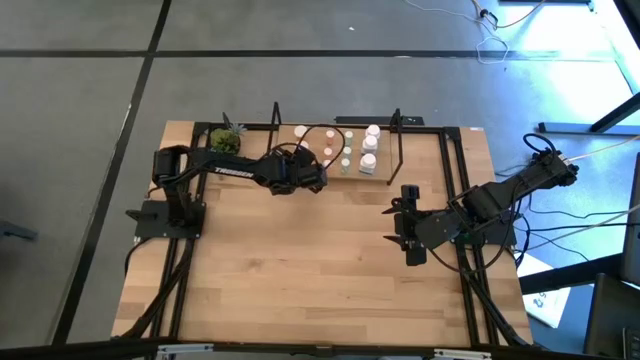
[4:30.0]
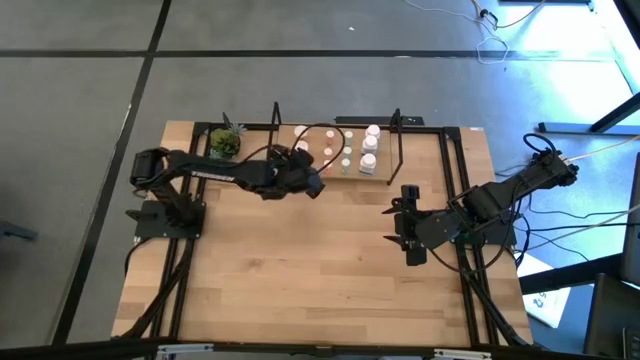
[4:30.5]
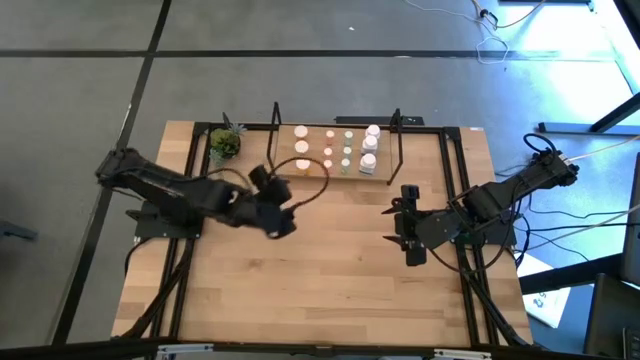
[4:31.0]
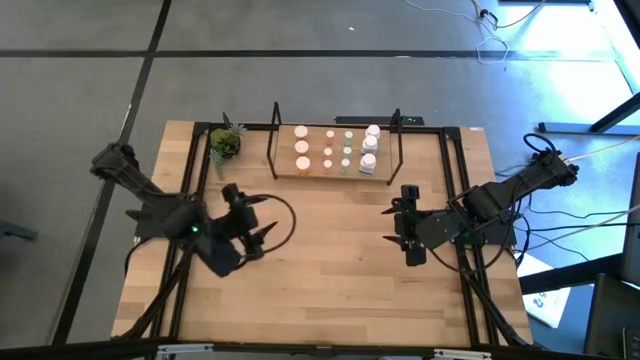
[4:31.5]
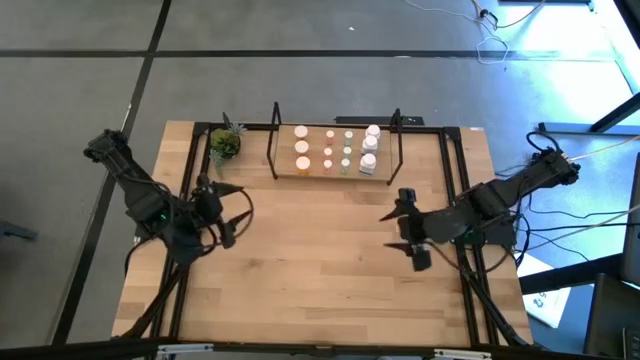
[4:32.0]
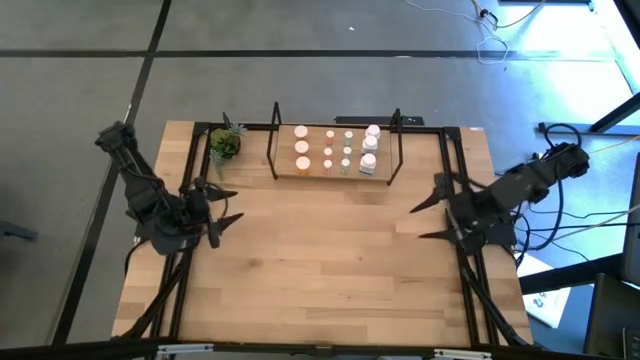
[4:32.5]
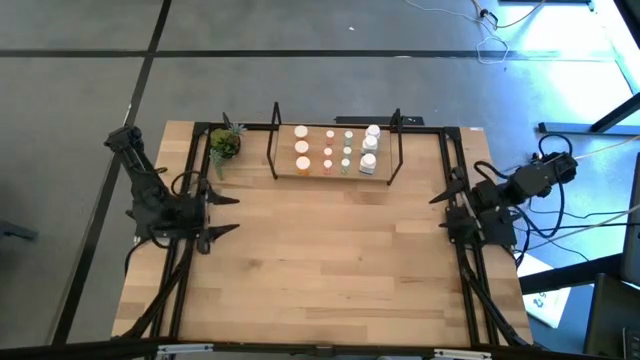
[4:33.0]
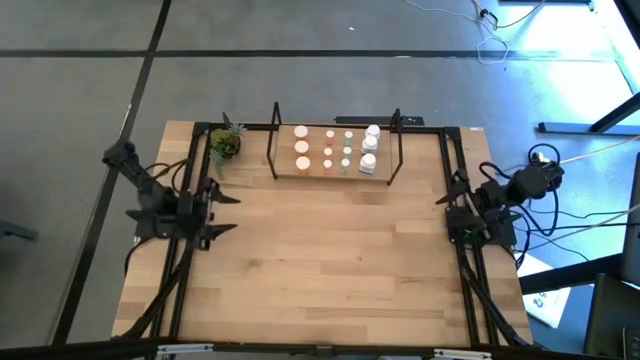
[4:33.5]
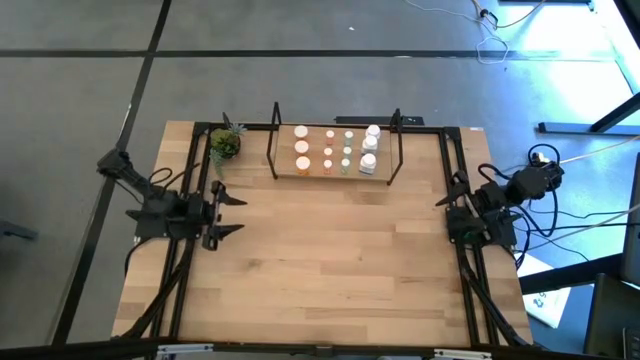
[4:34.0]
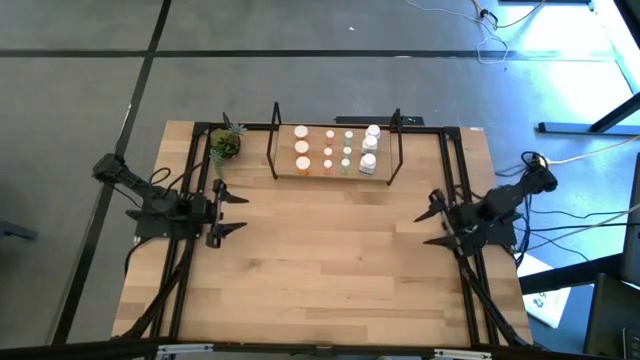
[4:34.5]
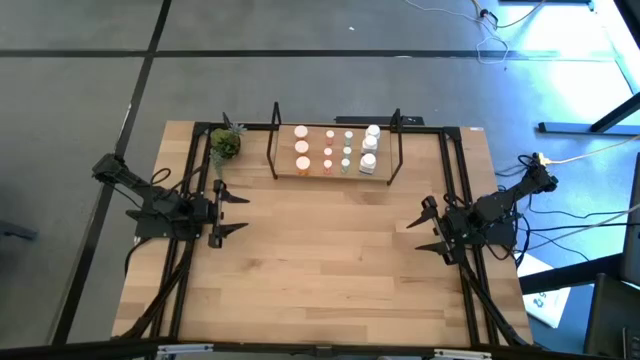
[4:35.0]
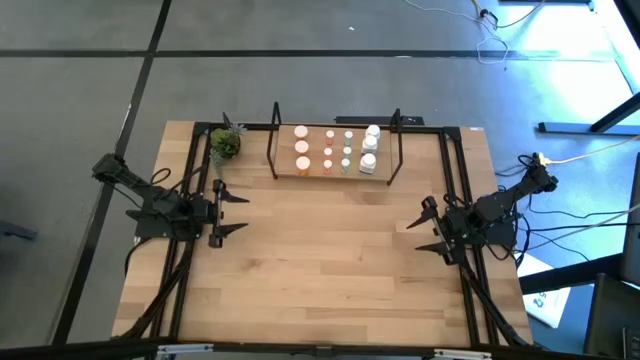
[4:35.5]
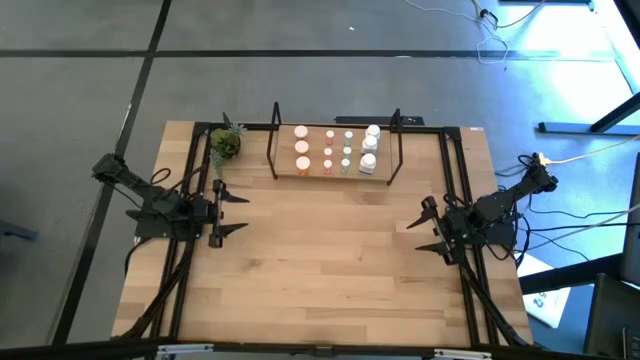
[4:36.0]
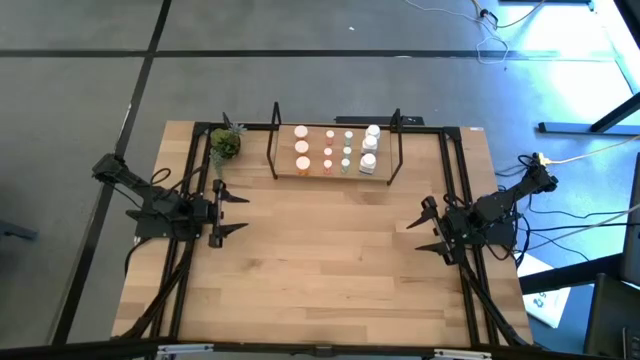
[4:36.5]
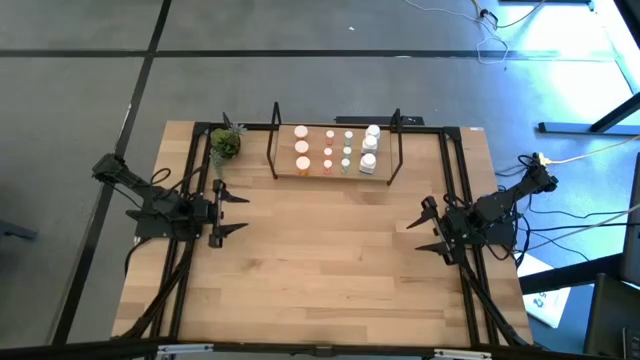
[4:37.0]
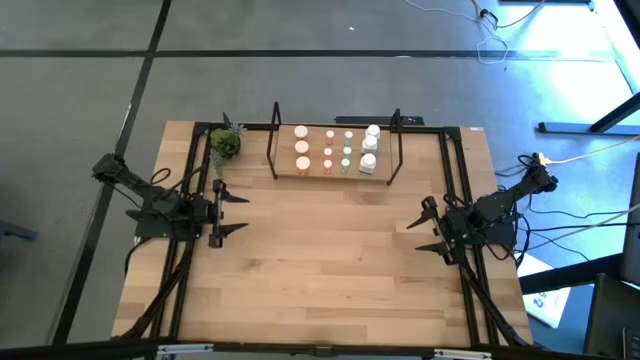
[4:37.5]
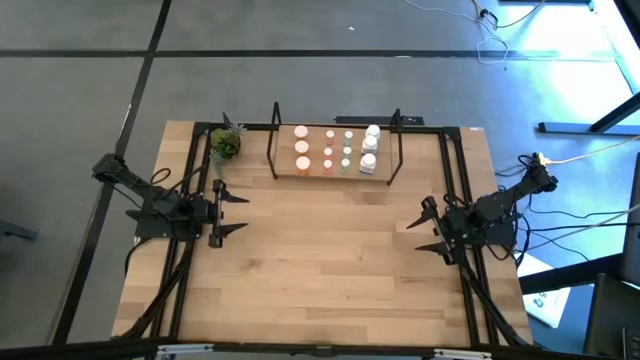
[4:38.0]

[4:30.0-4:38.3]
Task: Pick and place medicine bottles onto shelf by color
Return to Home Position

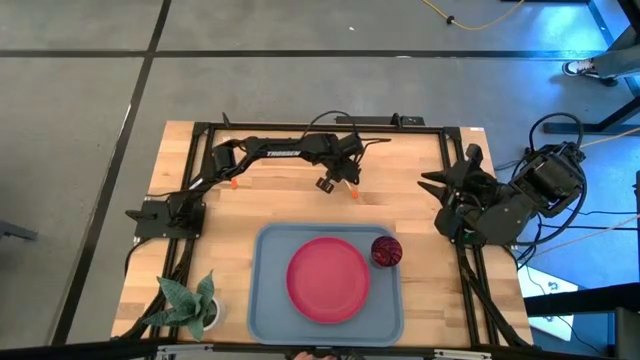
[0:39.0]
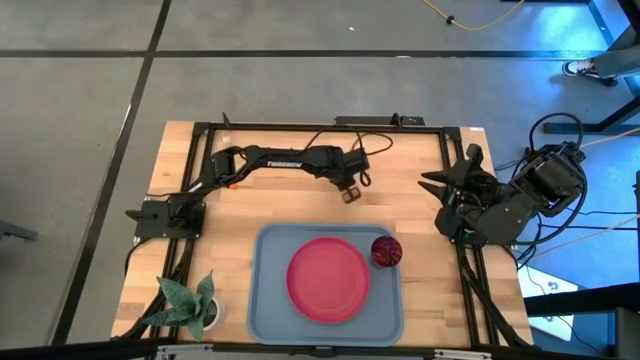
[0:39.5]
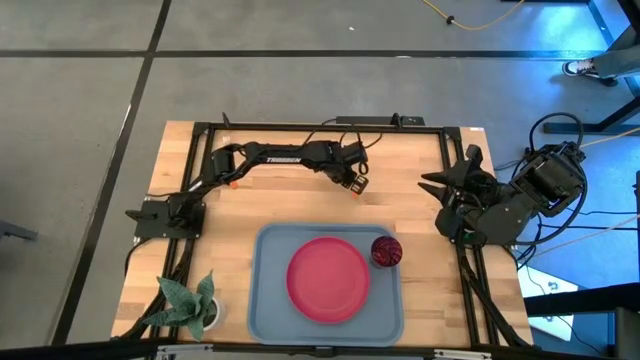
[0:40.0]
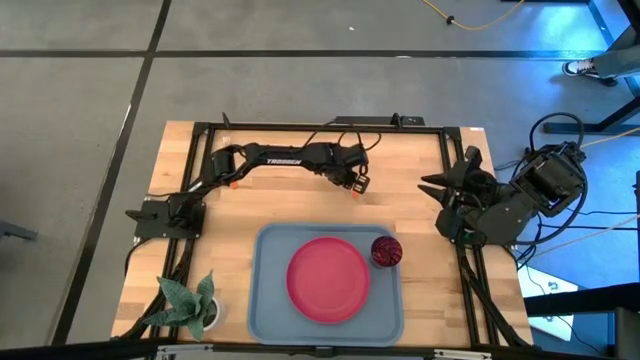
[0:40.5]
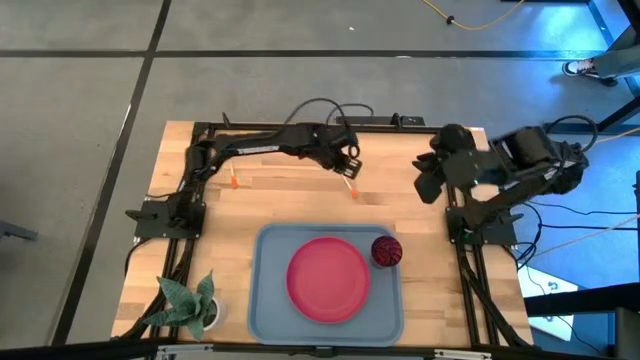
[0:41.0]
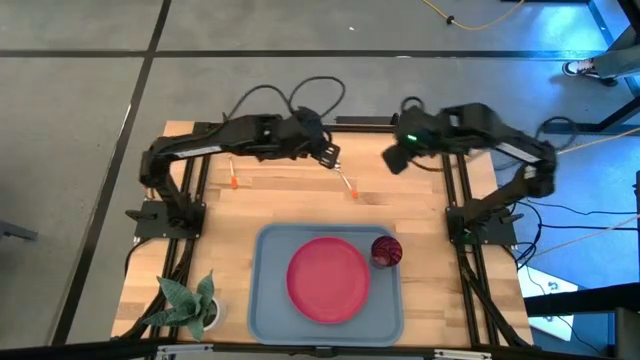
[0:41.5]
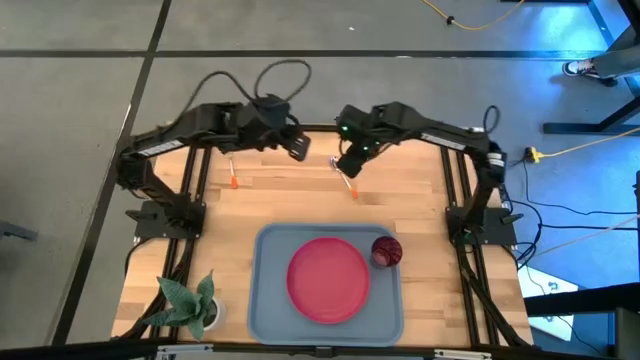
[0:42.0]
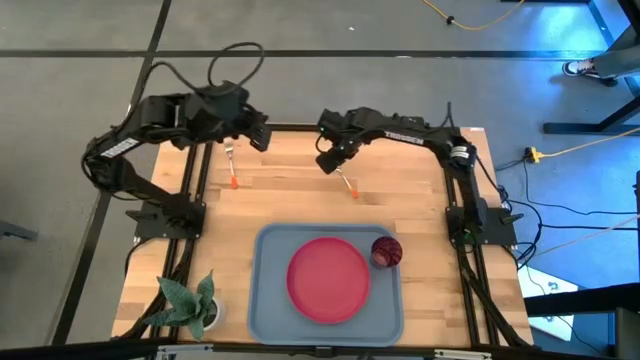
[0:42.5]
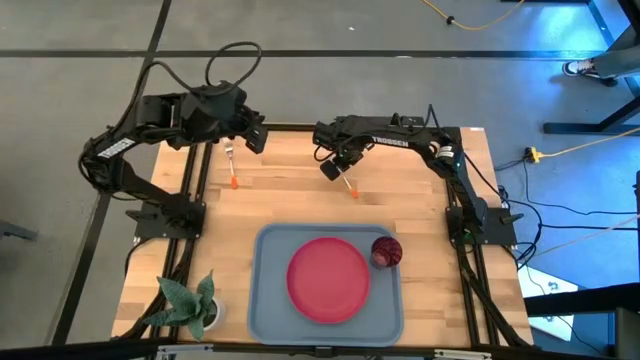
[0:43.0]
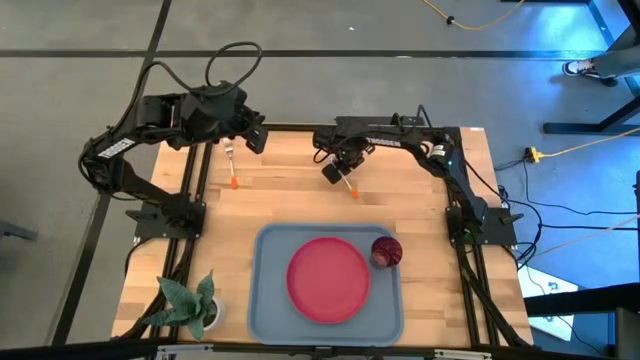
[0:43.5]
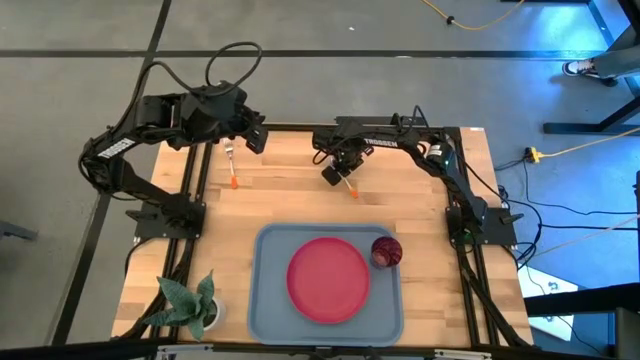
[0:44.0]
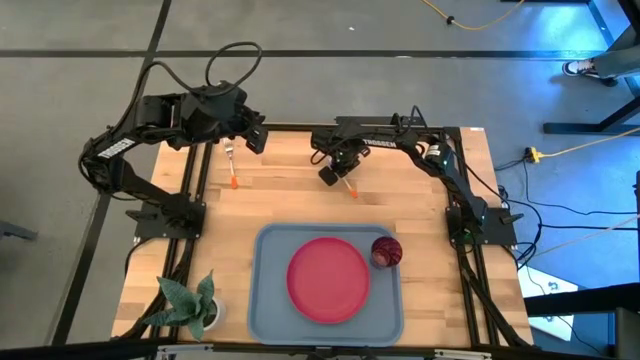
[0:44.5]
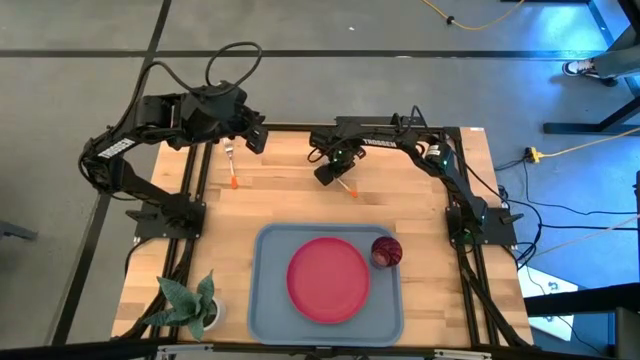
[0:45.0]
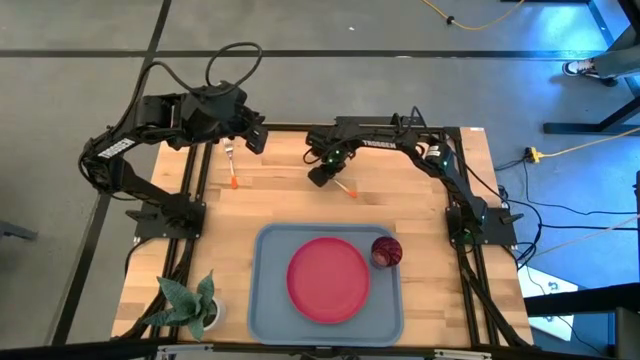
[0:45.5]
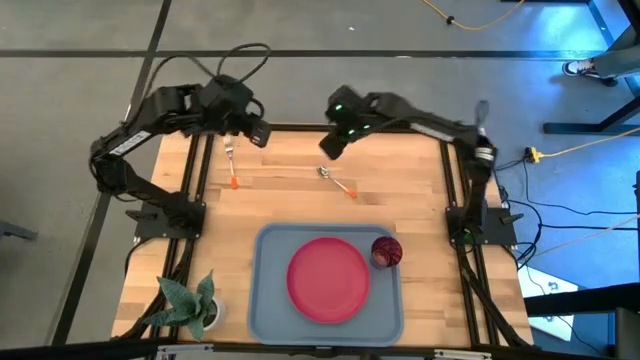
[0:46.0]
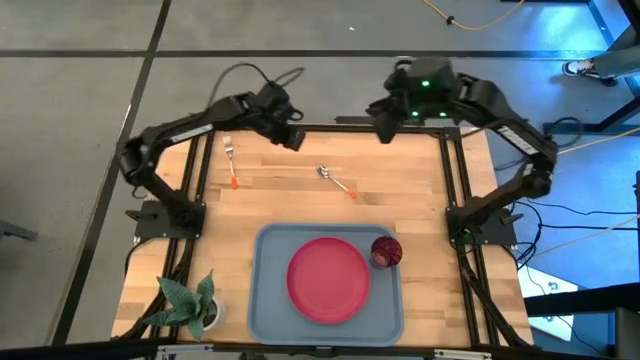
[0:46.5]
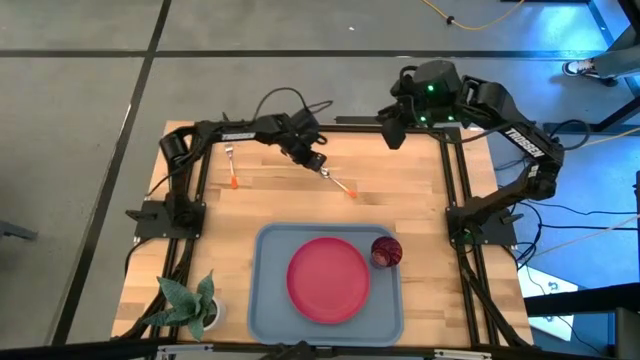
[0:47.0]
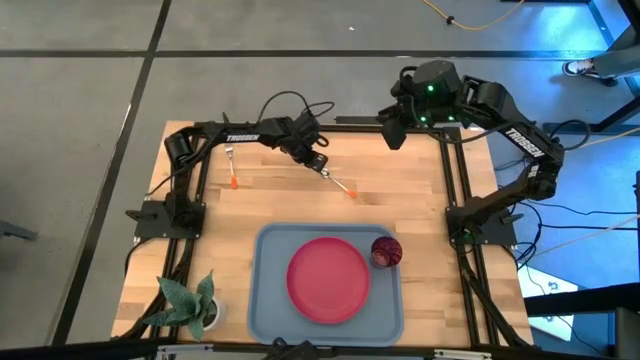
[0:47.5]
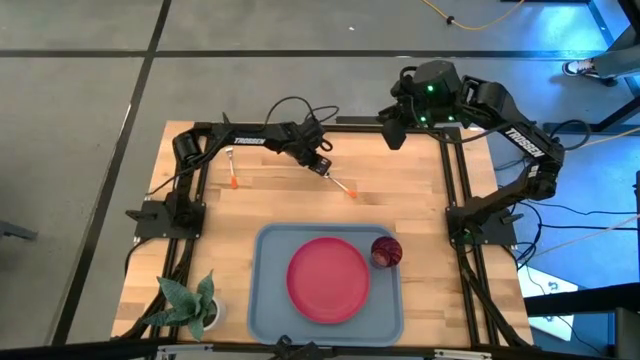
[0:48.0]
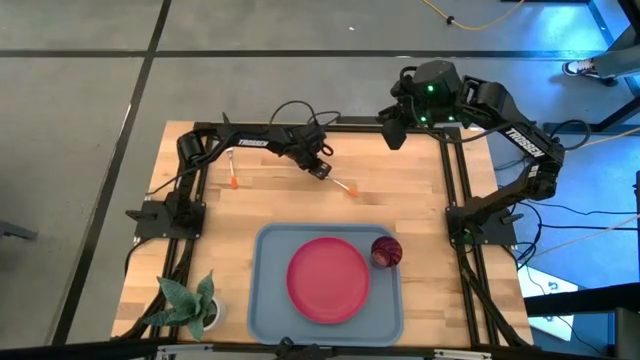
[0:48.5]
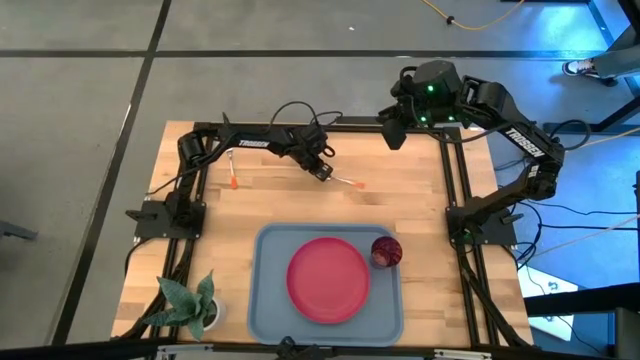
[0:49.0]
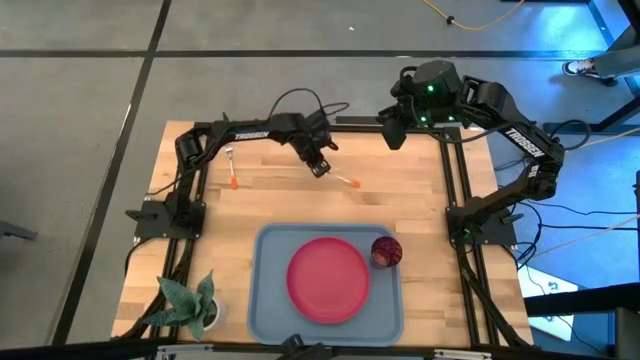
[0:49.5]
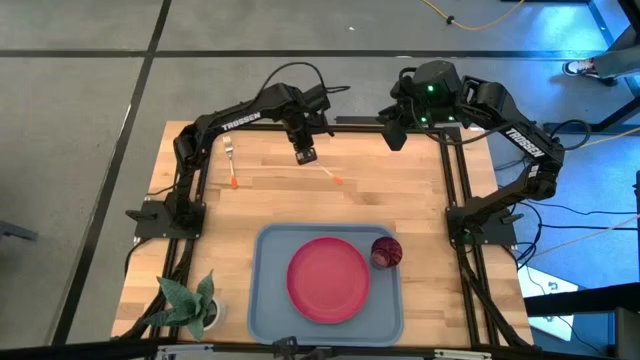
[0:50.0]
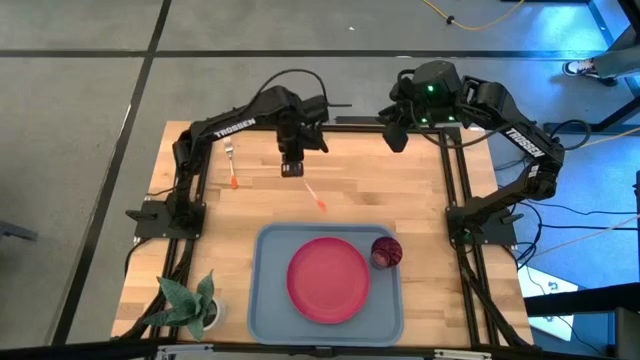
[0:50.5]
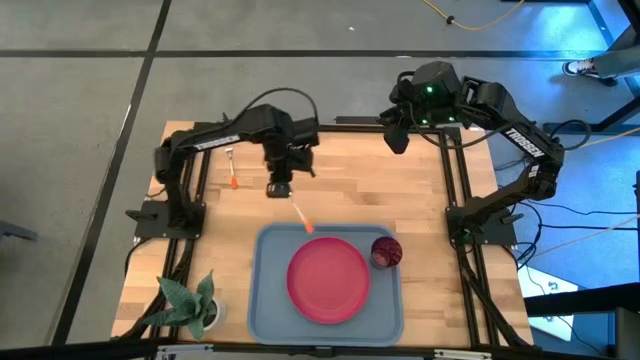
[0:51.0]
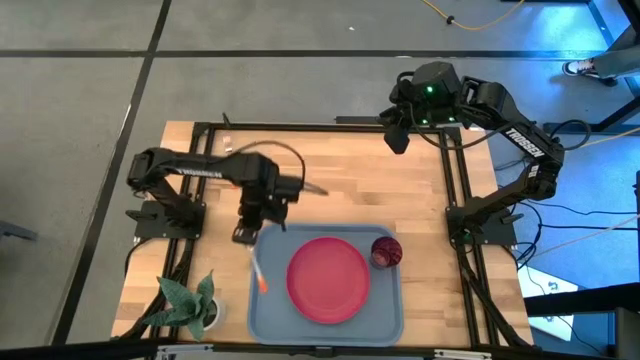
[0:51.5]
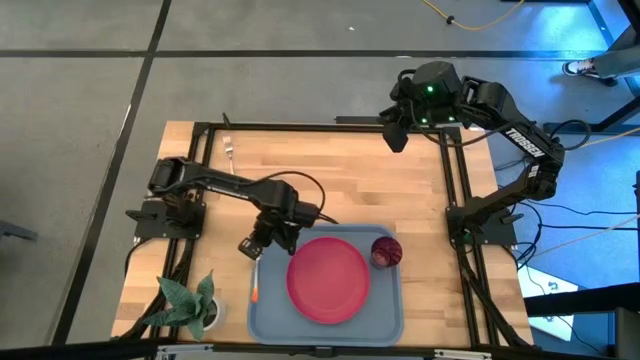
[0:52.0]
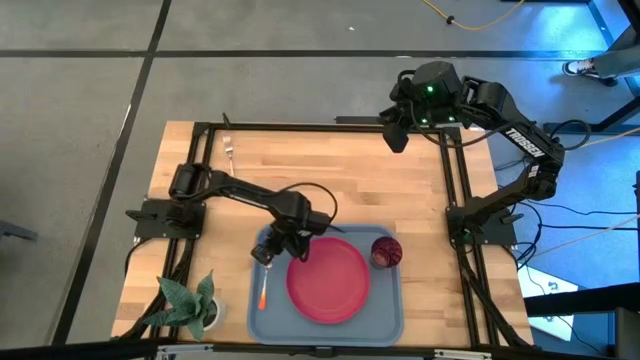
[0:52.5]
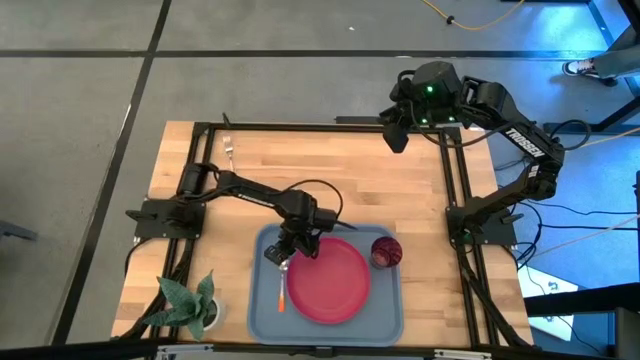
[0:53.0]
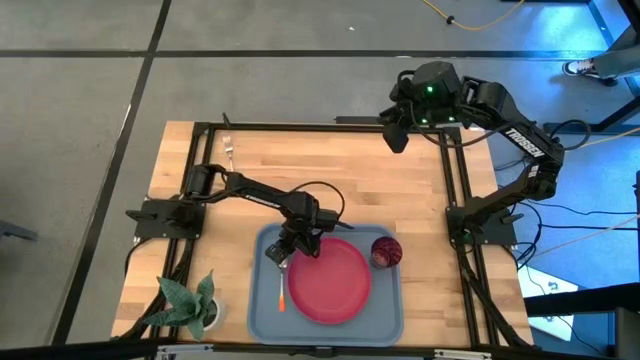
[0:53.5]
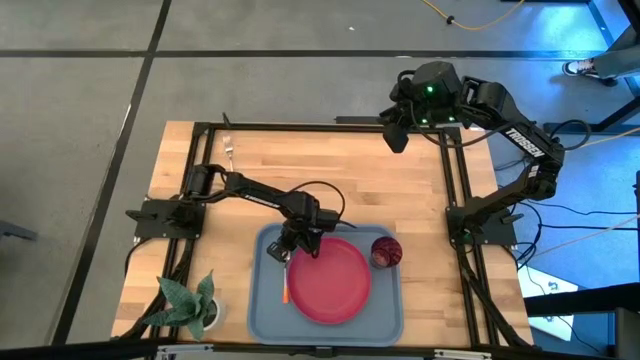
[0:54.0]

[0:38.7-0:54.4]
Task: Pick and place plate/cup/fork/spoon on tray
Put the orange spoon on the blue serving tray to the left of the pink plate
